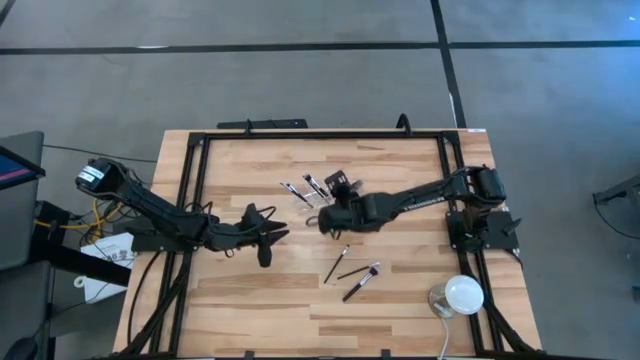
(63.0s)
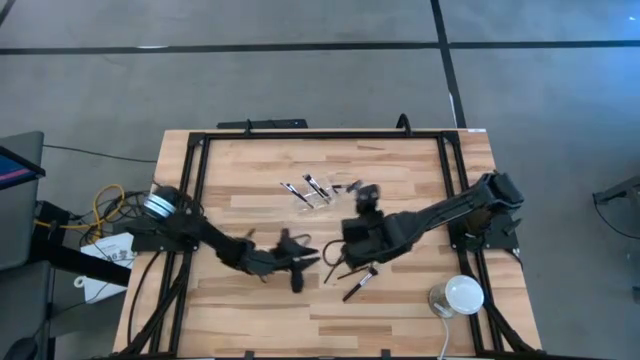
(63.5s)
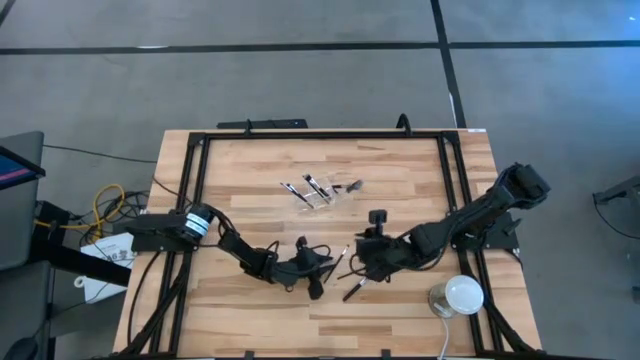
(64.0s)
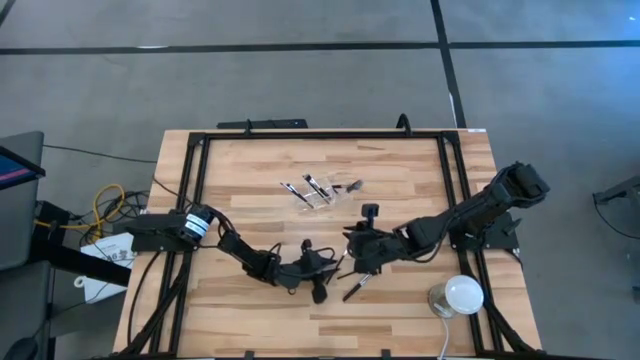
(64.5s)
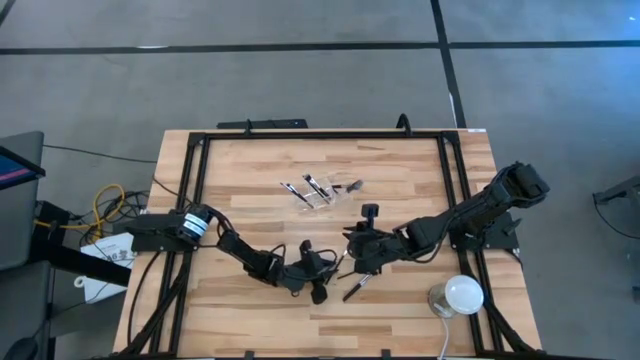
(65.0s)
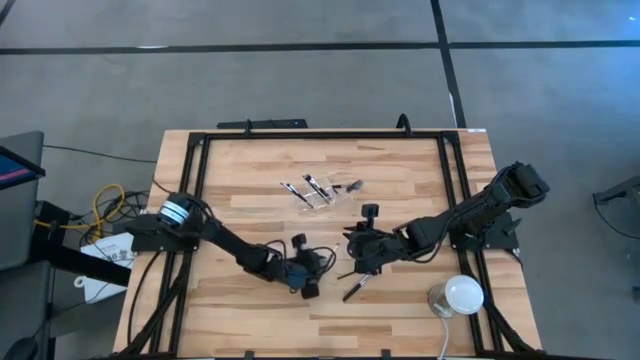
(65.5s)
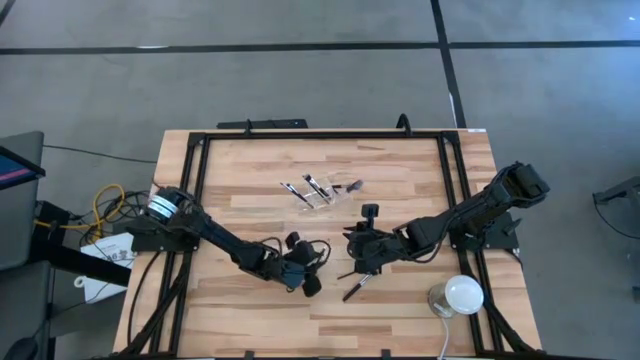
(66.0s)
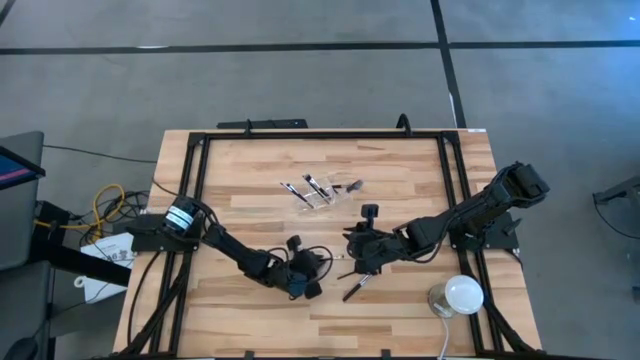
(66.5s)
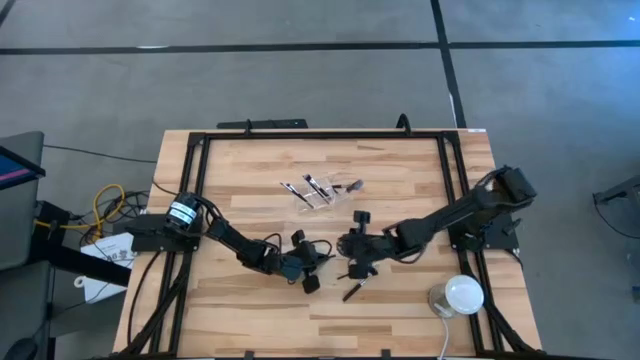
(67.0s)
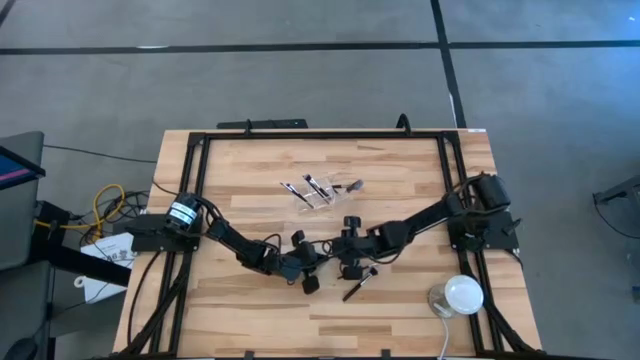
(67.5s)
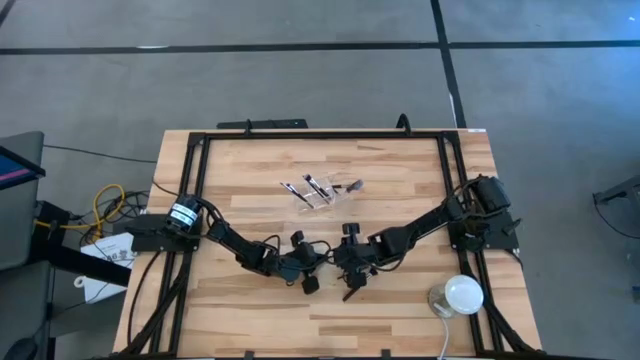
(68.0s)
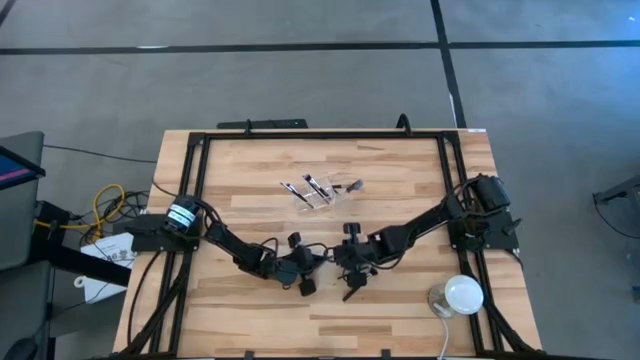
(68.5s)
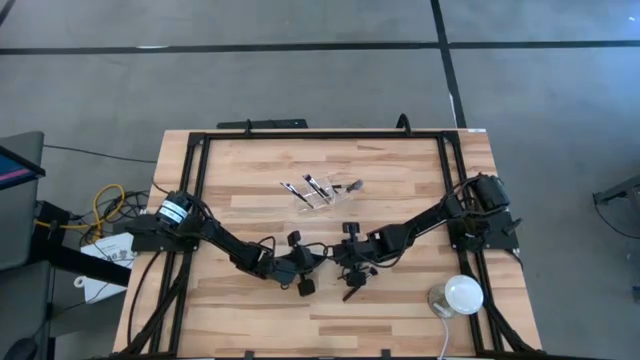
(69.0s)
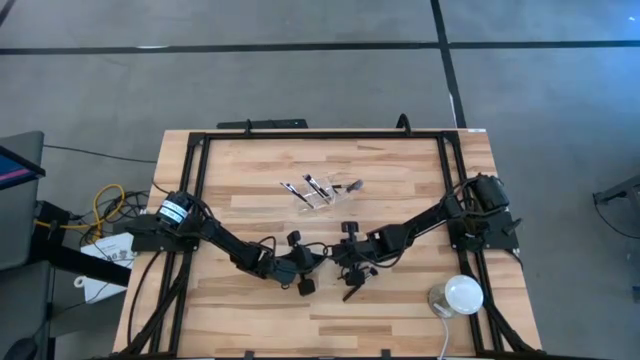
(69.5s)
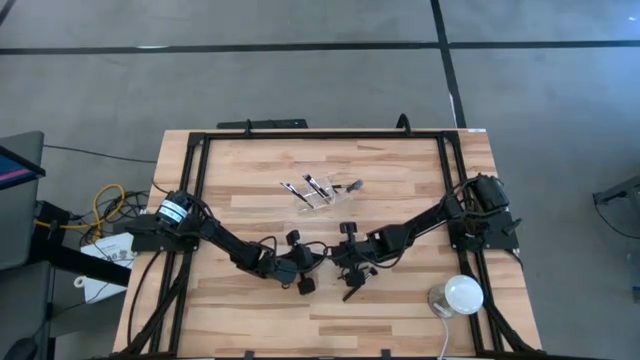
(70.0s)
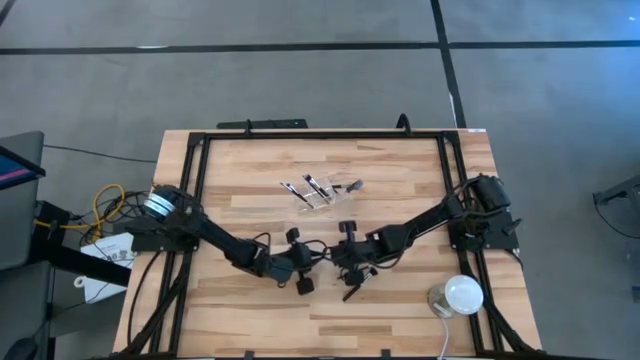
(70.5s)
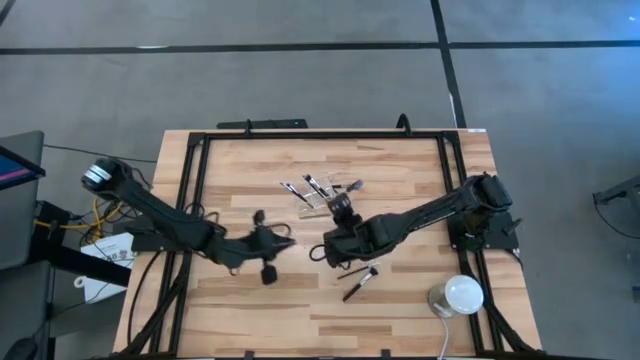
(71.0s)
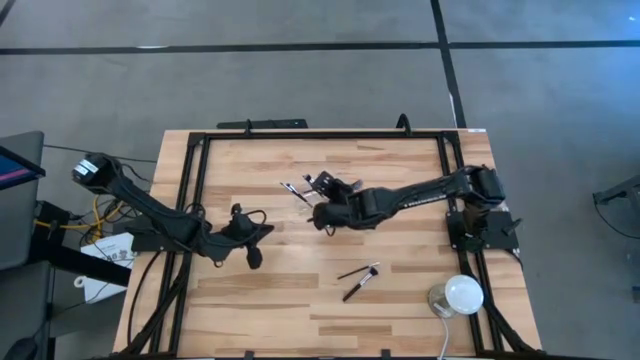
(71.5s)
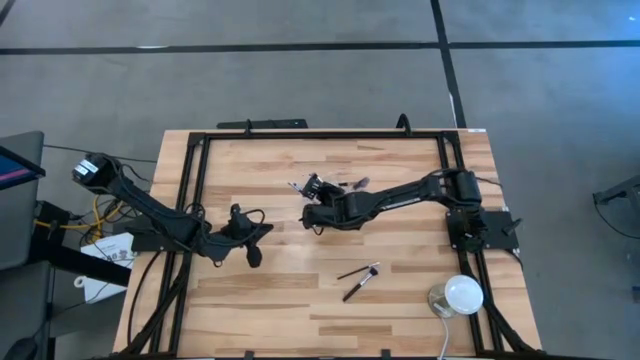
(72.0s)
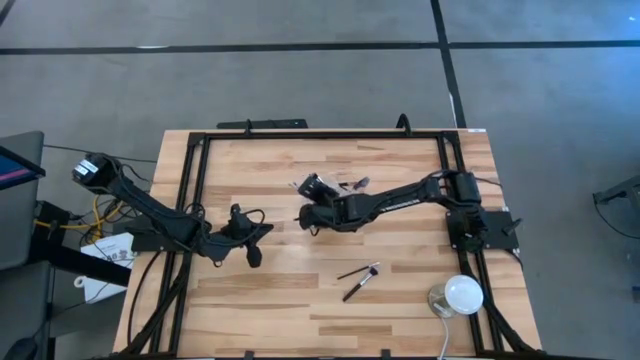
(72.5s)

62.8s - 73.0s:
Task: Put items in baskets/containers
Put the eyeshadow brush into the transparent organizer

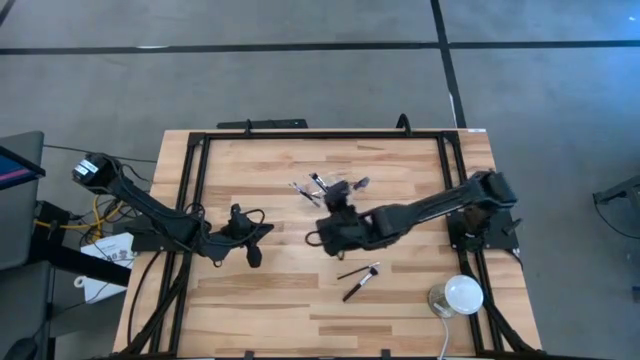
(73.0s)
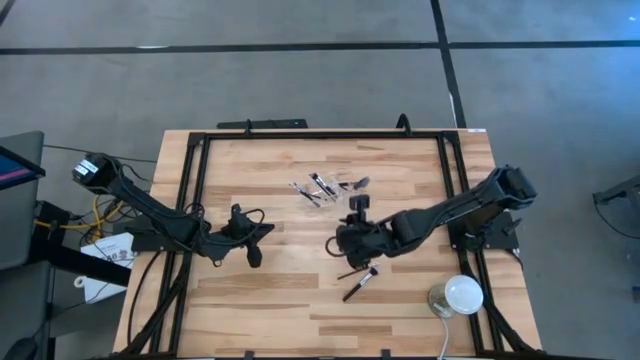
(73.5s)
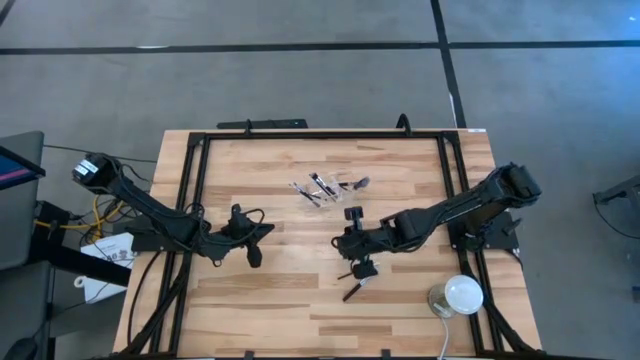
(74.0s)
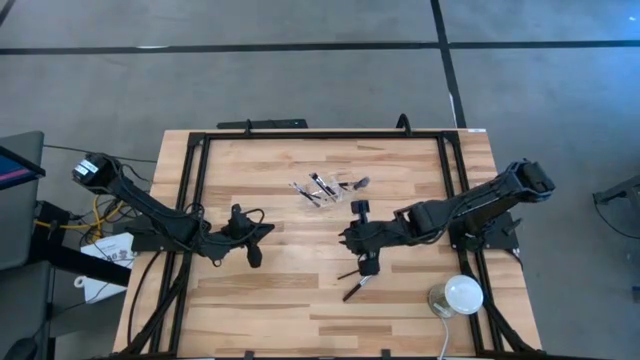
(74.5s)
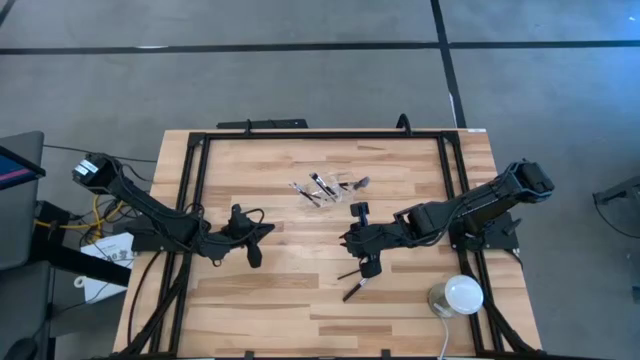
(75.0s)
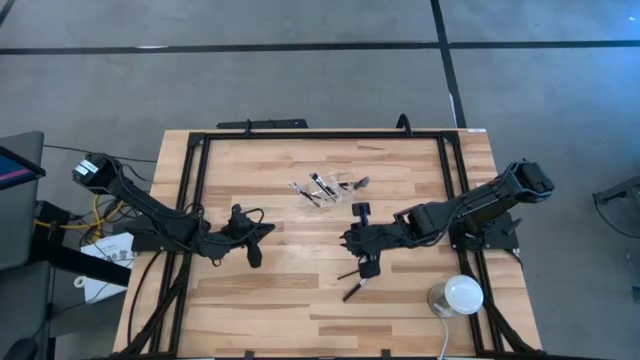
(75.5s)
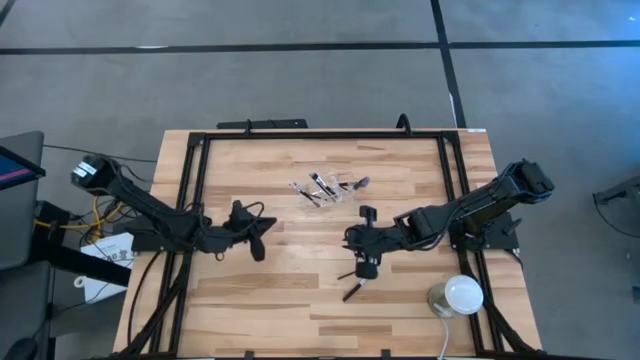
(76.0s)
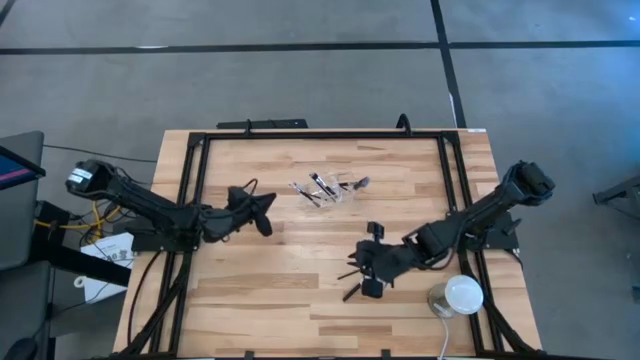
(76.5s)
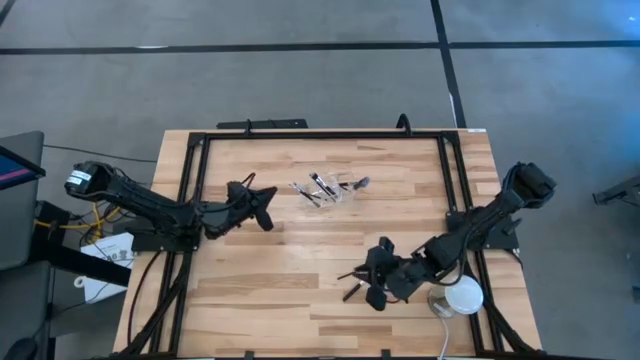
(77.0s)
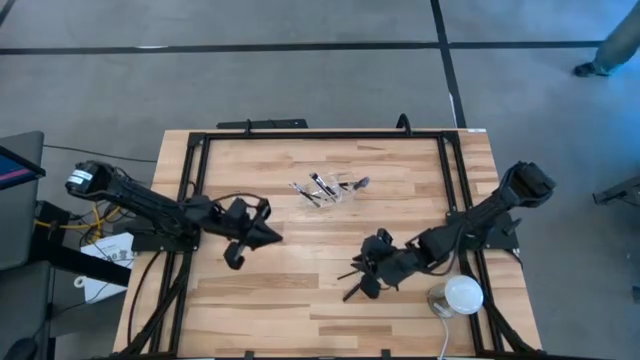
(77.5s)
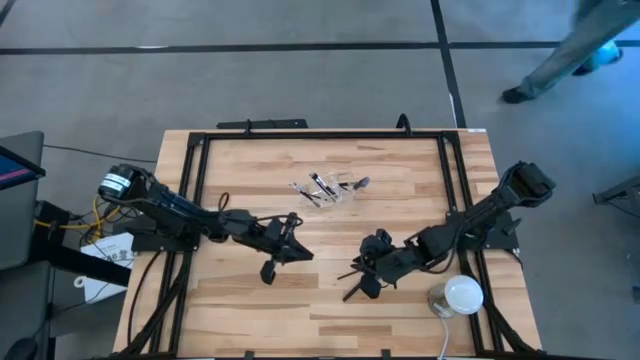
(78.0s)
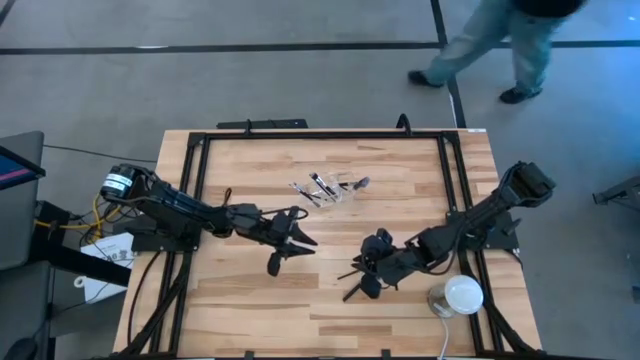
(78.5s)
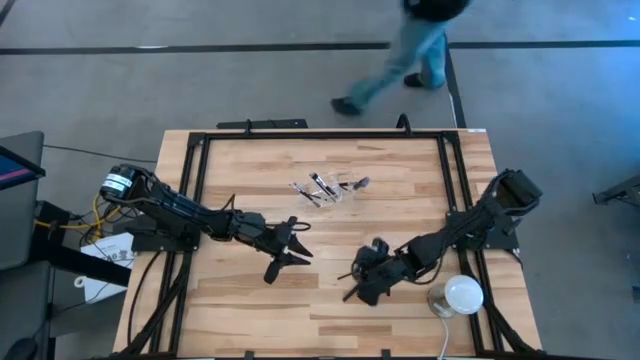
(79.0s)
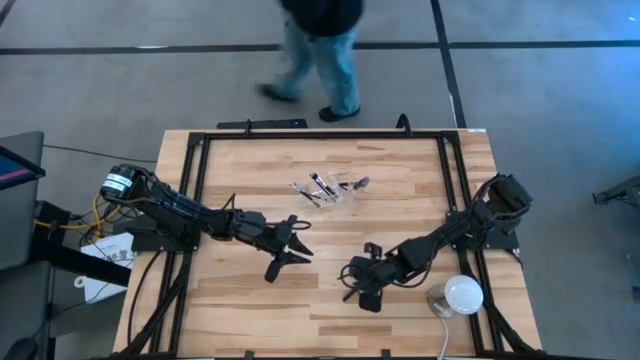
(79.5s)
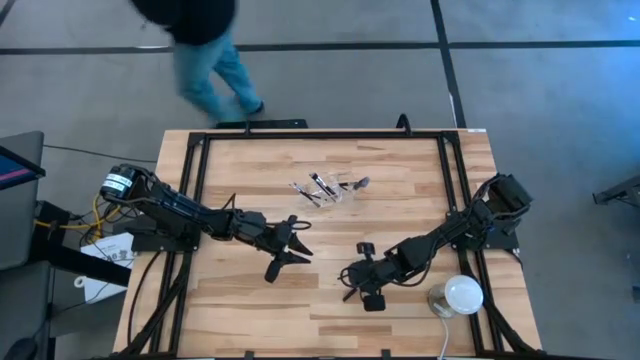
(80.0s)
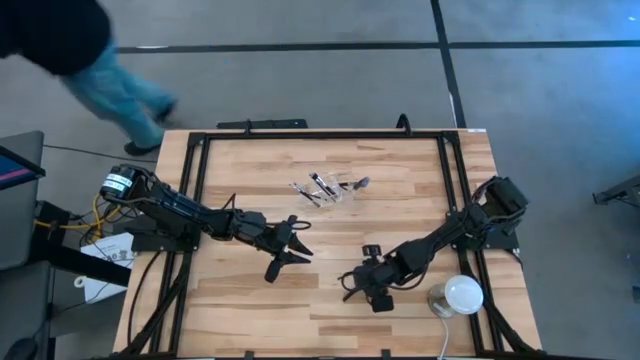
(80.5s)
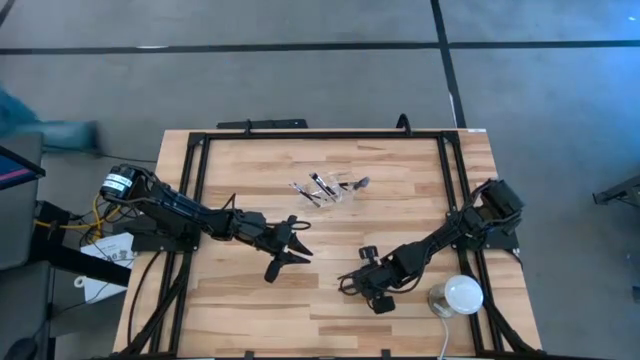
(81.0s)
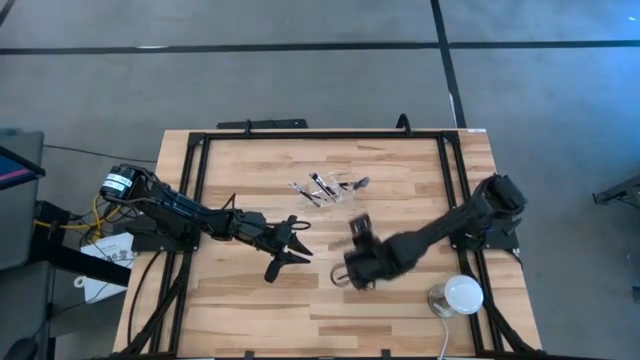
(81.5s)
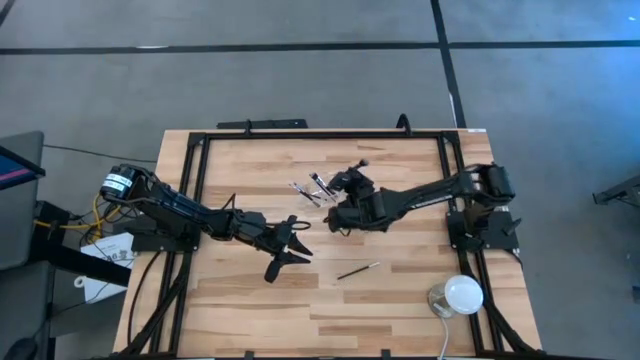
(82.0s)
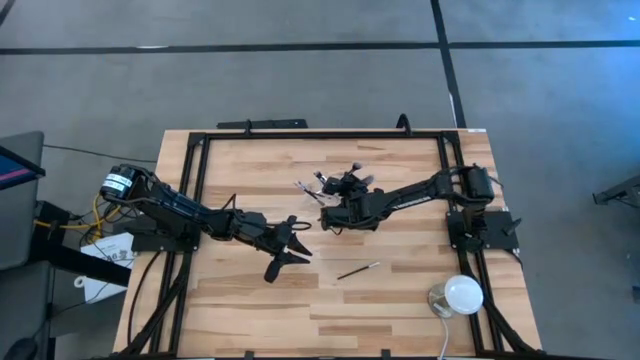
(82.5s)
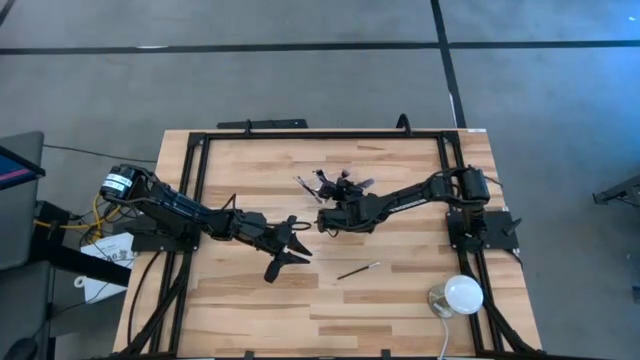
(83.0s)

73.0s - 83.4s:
Put the powder brush into the transparent organizer
